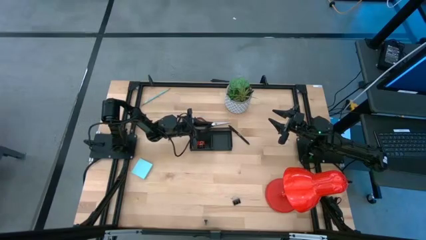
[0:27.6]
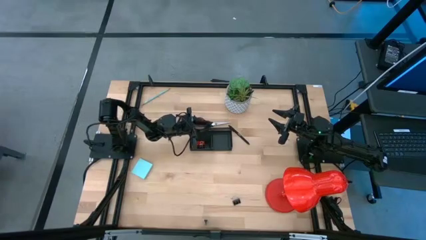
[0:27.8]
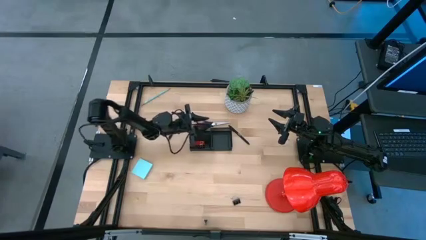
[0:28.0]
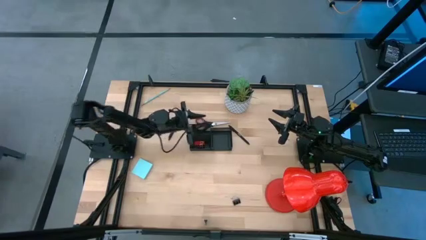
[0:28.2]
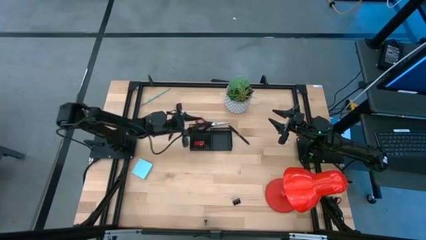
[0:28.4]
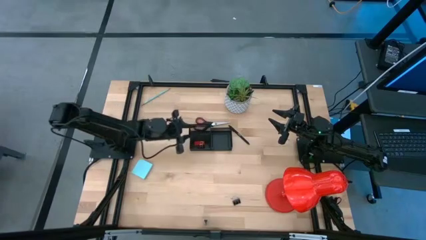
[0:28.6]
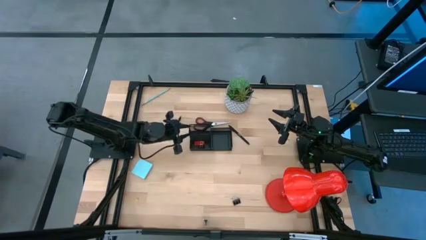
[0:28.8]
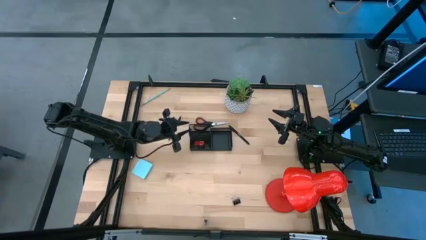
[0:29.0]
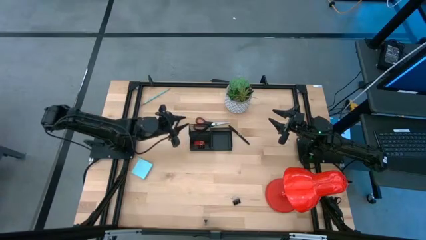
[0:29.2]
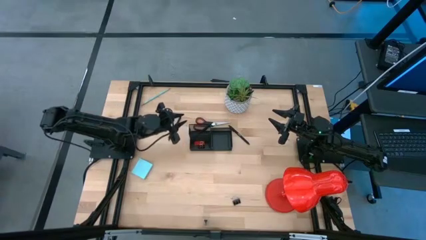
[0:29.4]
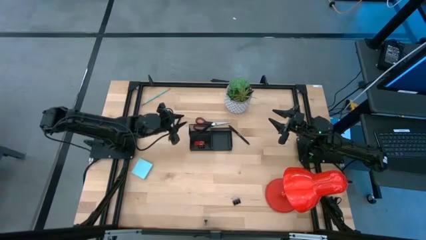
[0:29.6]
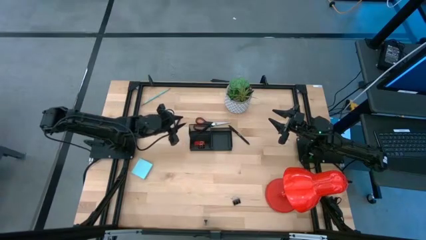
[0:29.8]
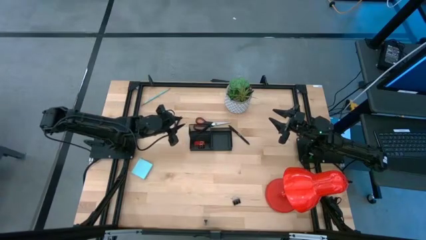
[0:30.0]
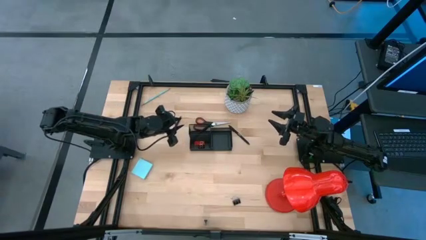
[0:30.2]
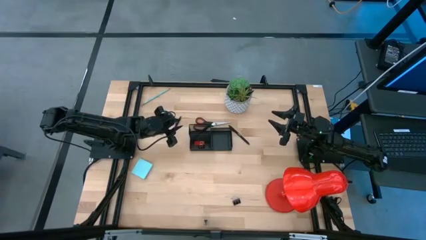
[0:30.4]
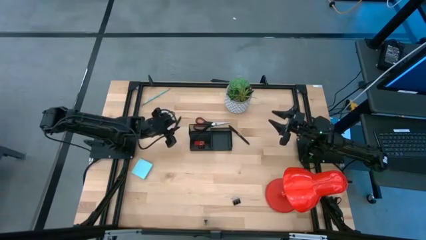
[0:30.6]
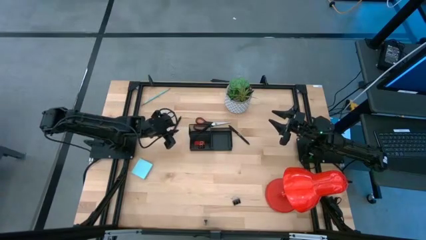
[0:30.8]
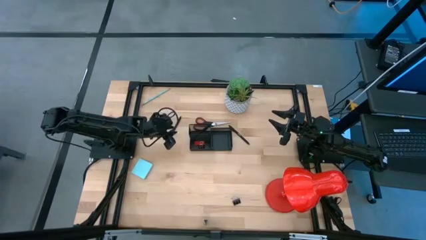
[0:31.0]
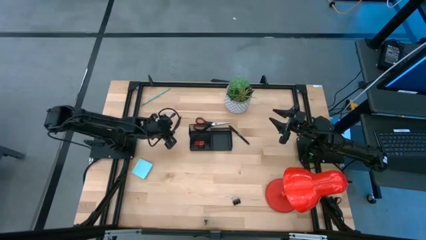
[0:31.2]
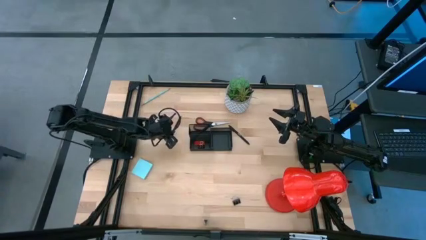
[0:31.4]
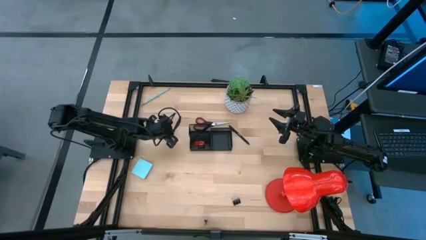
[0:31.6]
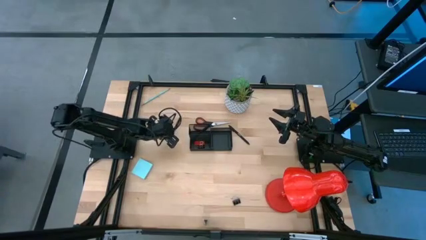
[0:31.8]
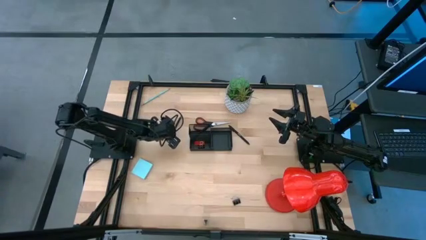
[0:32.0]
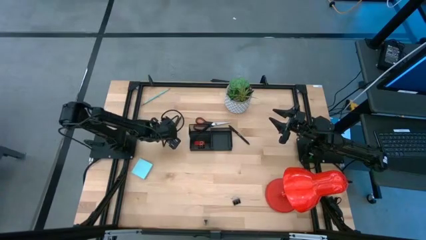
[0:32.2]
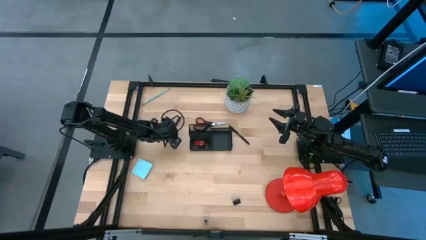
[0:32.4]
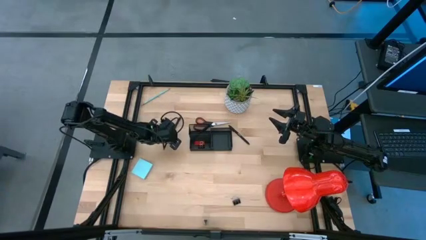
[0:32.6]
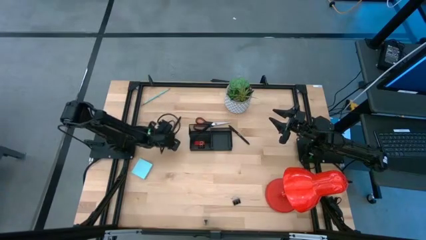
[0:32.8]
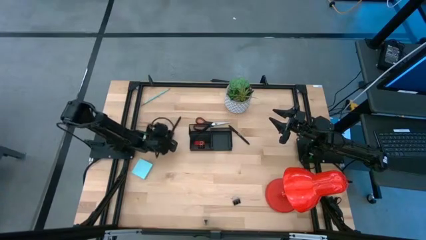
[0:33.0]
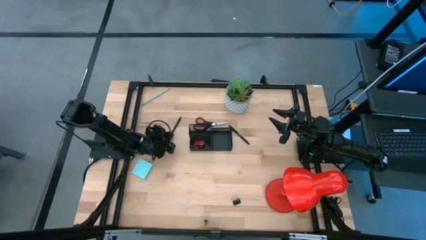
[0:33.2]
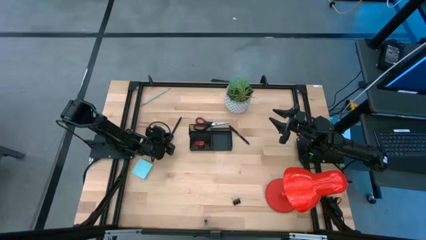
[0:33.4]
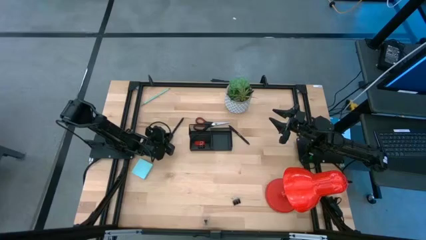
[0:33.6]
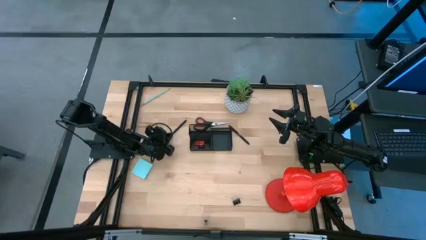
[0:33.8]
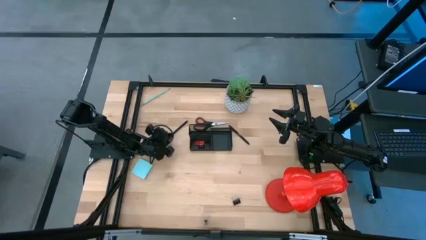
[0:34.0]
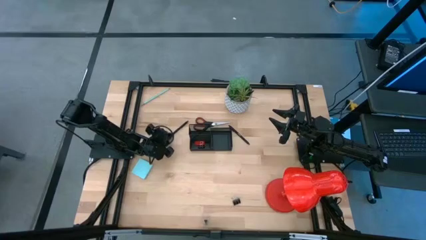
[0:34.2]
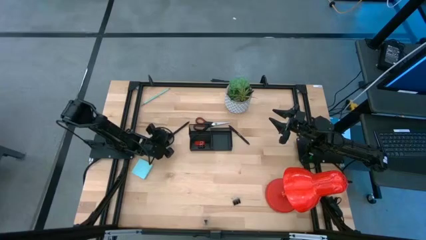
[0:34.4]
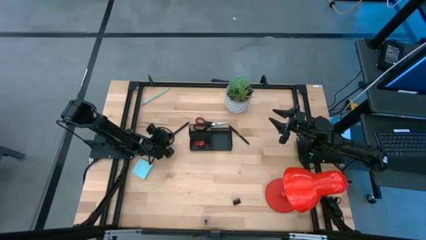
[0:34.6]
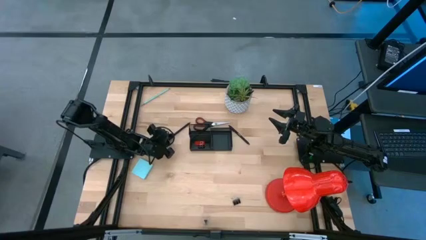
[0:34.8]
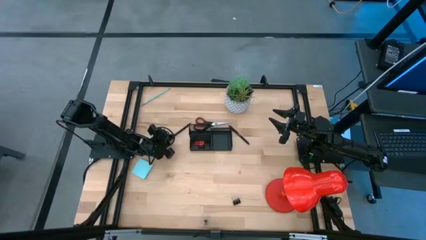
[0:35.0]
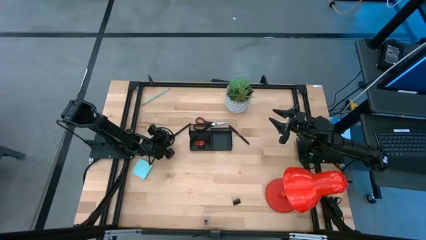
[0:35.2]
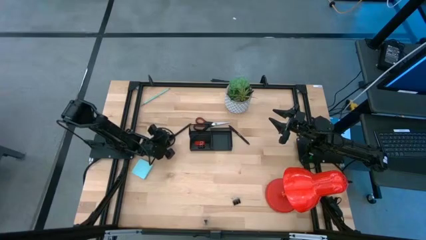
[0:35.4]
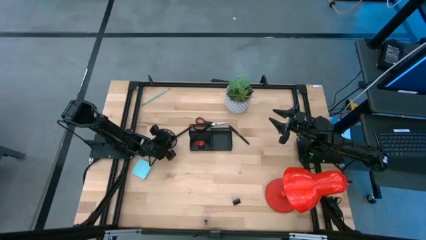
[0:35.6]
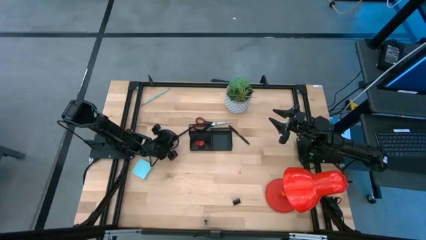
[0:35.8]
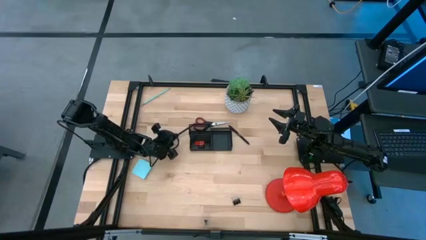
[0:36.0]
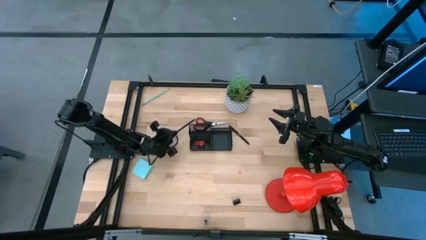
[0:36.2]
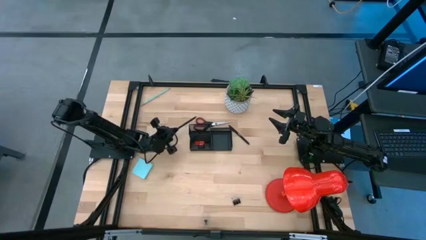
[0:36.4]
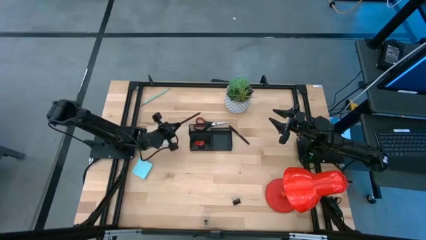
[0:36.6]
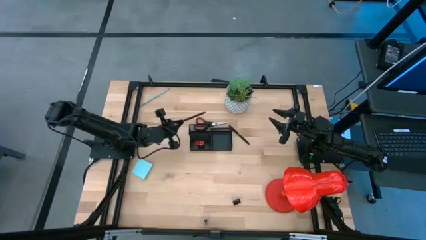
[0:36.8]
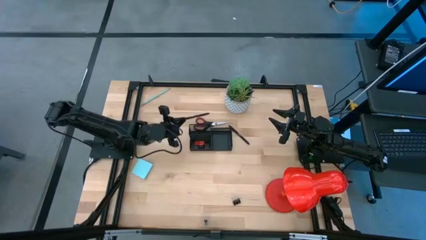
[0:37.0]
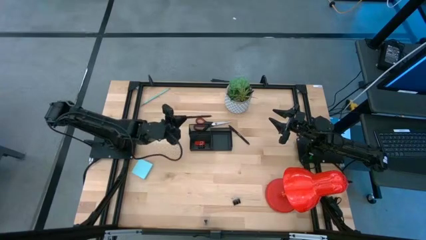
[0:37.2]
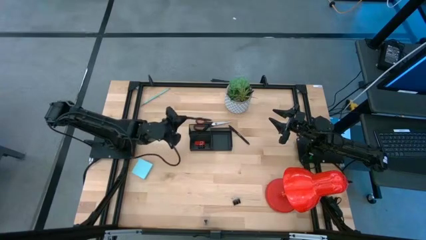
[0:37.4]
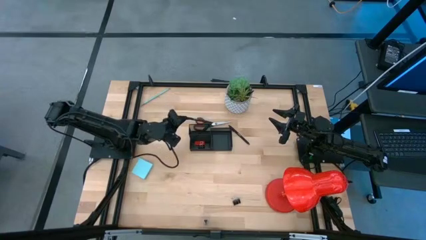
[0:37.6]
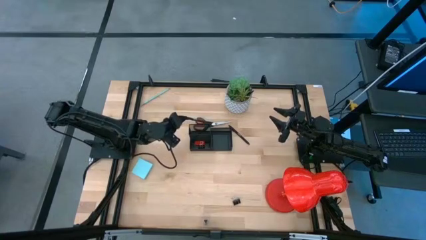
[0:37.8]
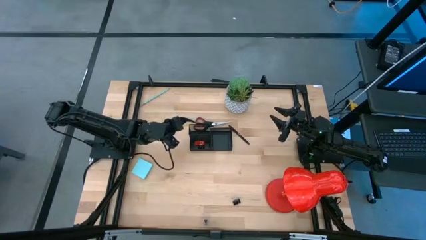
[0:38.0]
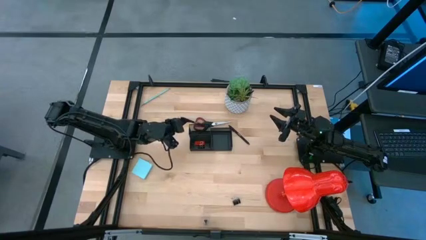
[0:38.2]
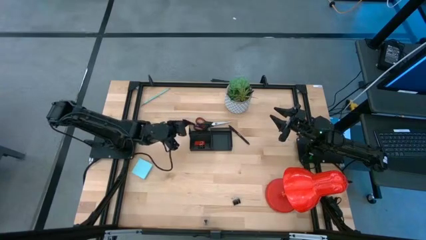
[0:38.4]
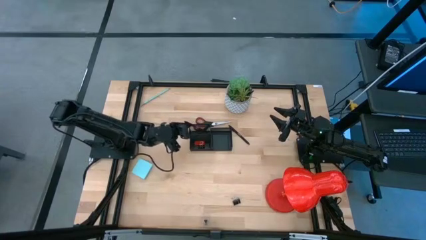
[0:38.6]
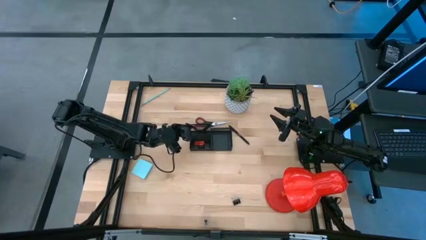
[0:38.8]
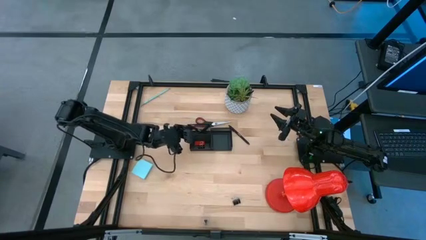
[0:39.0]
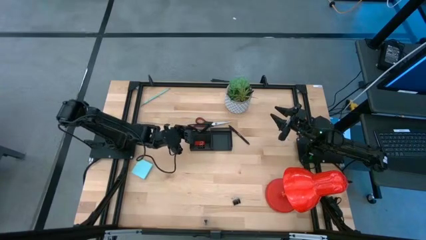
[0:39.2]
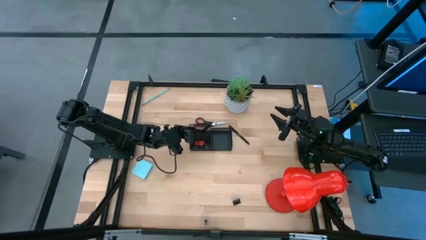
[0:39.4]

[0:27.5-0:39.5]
Task: Pick and place office supplies into organizer
Put the left pen into the top left section of the desk organizer

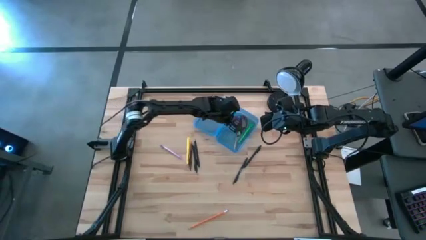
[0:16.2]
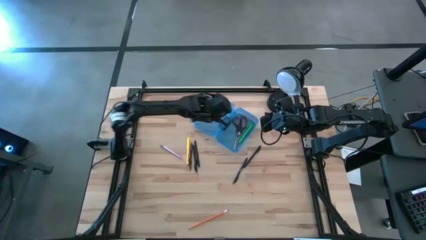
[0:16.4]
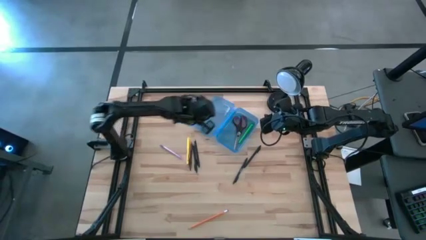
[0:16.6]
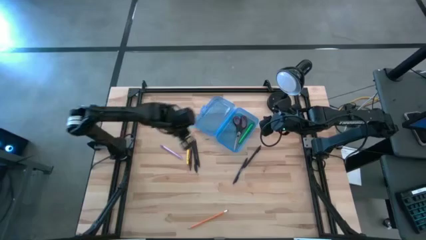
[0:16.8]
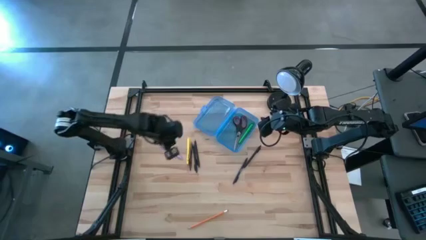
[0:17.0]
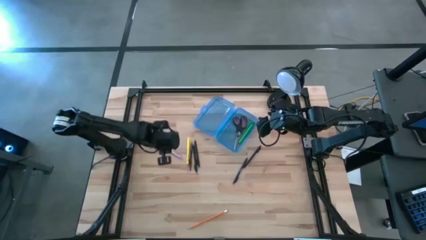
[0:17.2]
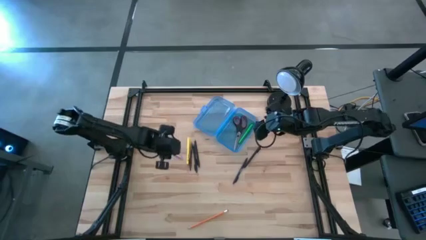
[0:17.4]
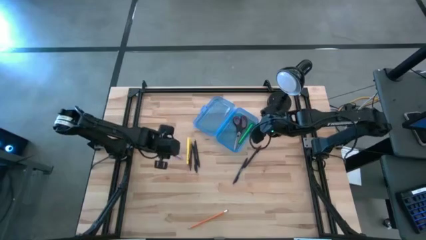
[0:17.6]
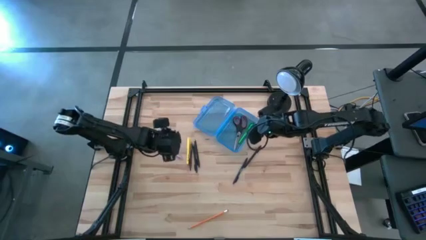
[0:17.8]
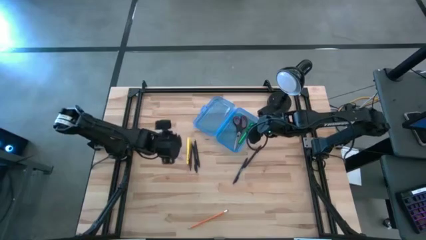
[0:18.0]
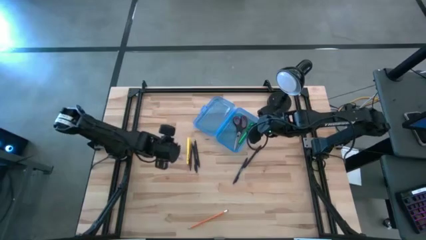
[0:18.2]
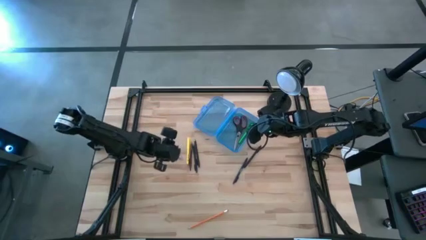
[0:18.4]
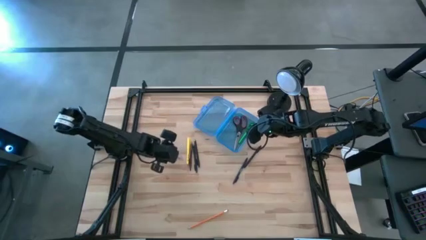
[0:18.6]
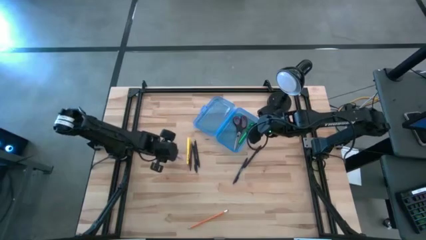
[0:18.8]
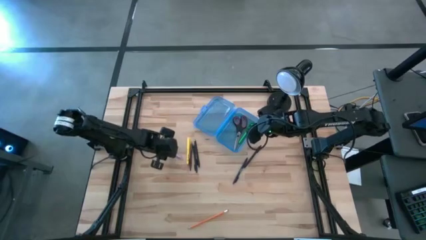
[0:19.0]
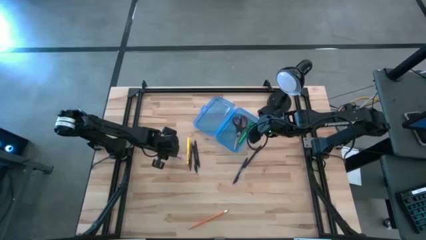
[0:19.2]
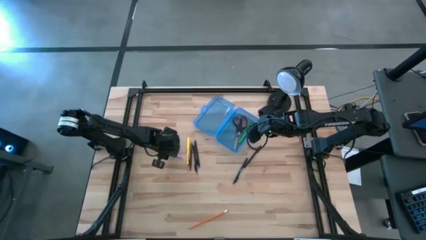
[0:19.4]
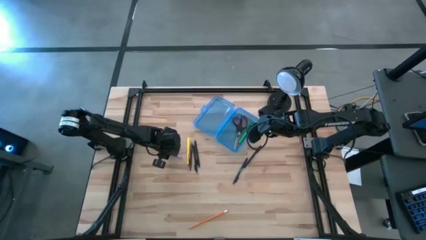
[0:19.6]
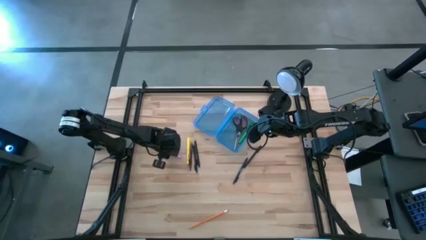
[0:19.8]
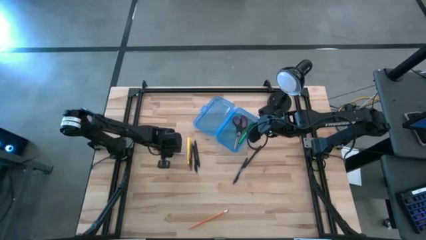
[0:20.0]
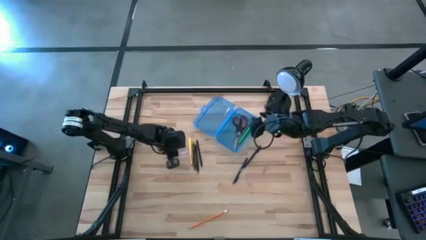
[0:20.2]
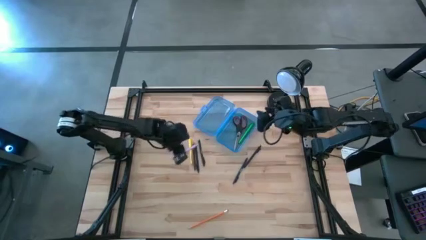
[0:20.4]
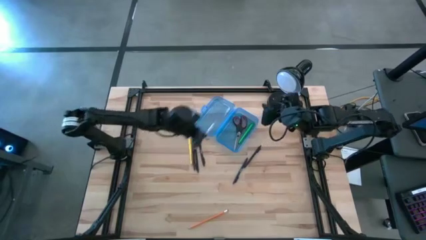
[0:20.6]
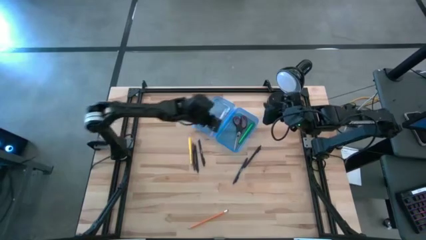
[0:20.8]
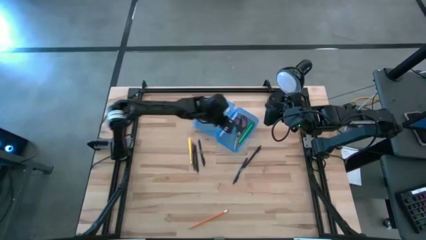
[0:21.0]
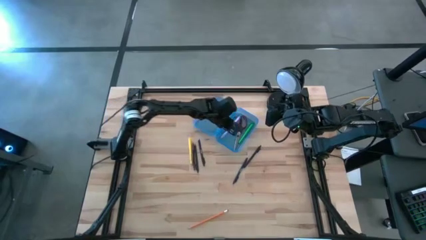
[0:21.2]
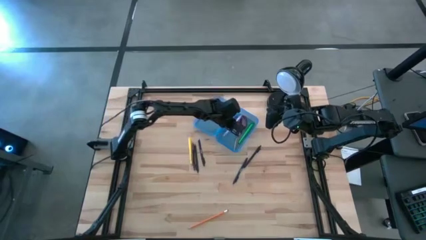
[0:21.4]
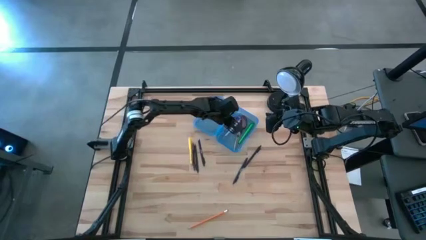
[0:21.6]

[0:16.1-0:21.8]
Task: Pick & place school supplies into a supply box
Put the light purple pen into the blue supply box
